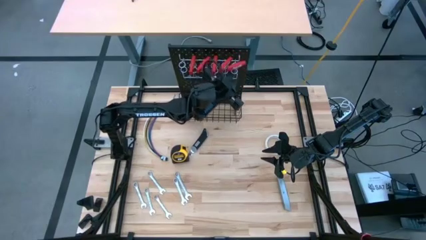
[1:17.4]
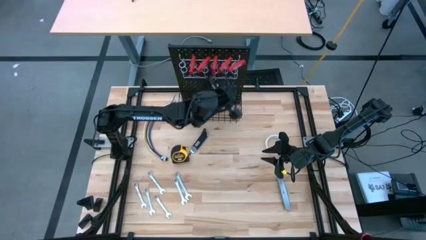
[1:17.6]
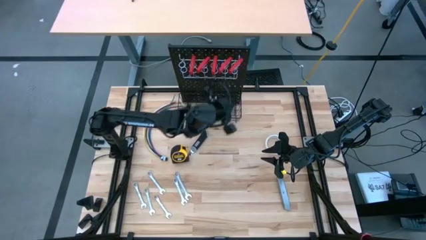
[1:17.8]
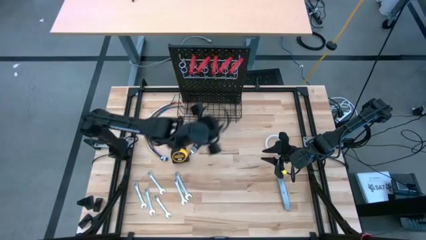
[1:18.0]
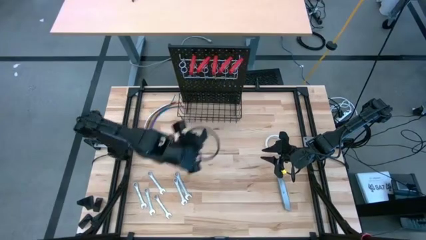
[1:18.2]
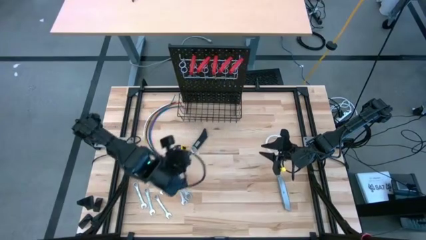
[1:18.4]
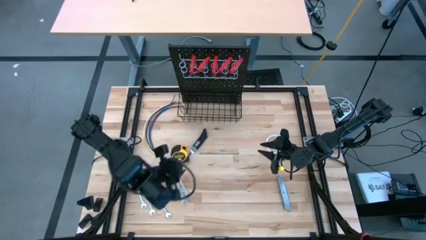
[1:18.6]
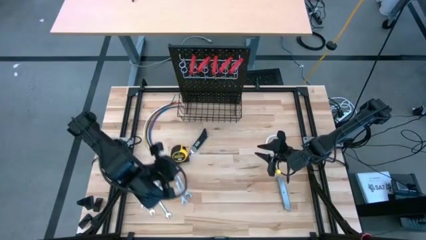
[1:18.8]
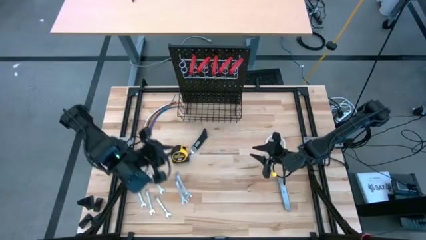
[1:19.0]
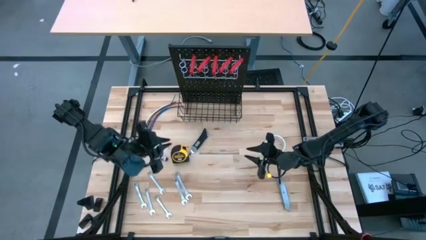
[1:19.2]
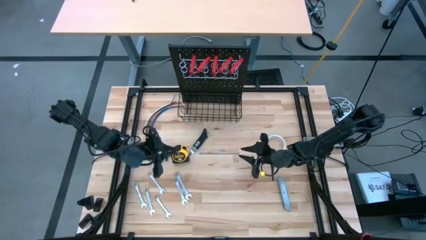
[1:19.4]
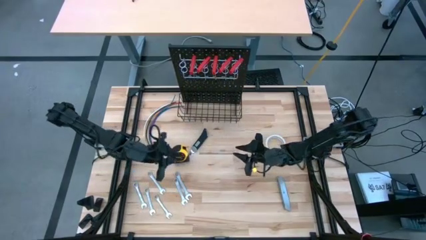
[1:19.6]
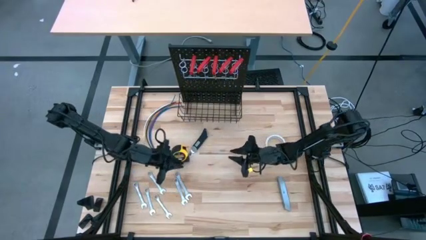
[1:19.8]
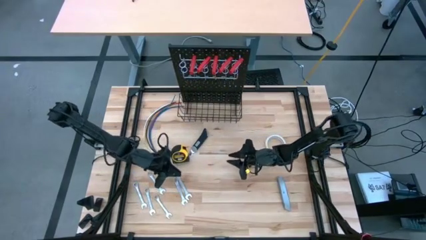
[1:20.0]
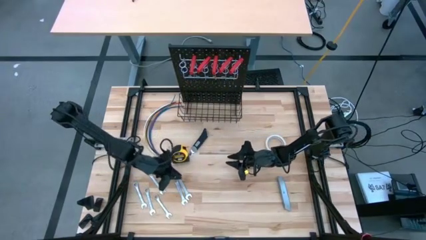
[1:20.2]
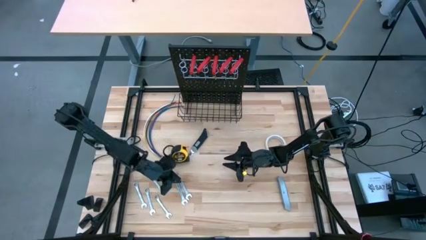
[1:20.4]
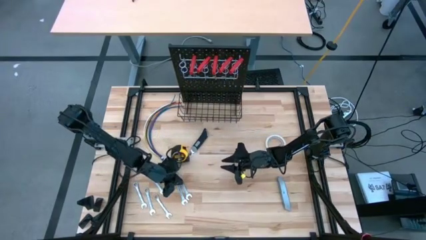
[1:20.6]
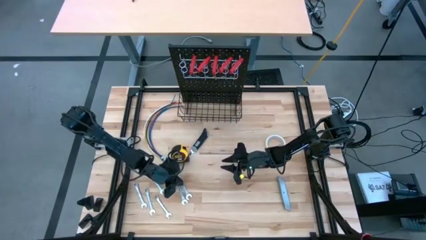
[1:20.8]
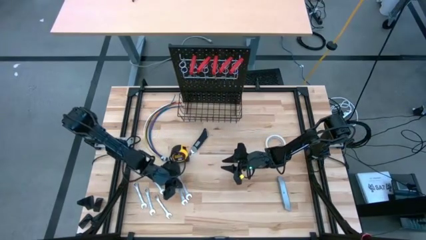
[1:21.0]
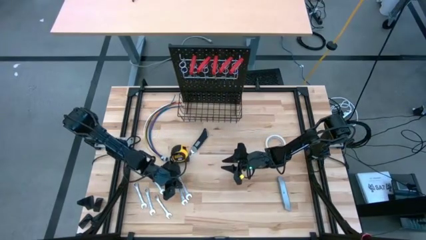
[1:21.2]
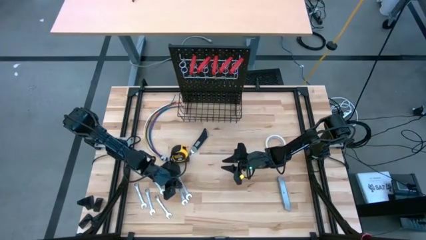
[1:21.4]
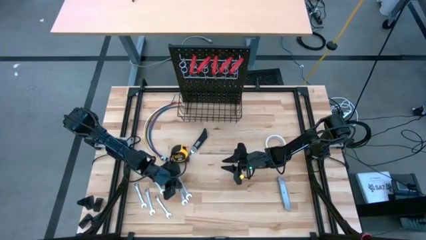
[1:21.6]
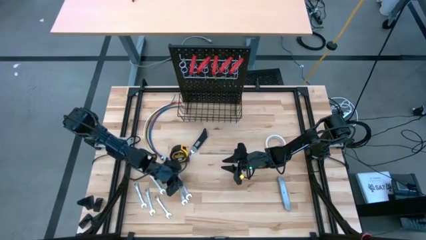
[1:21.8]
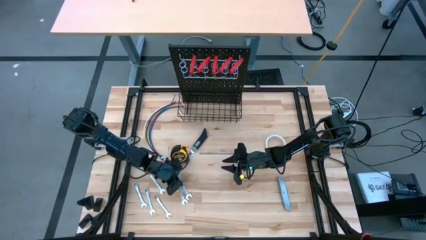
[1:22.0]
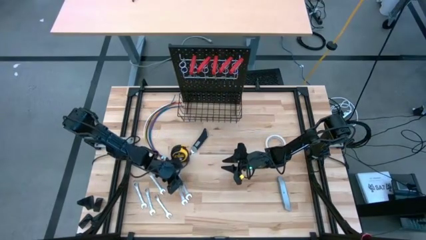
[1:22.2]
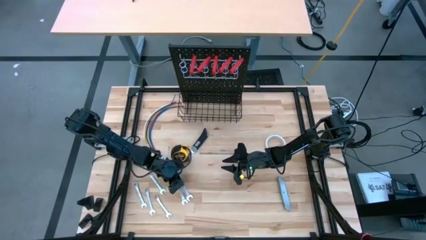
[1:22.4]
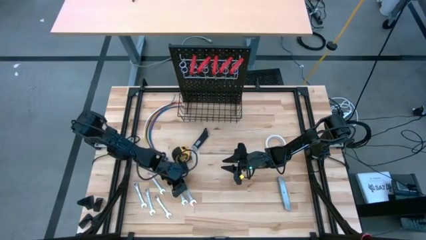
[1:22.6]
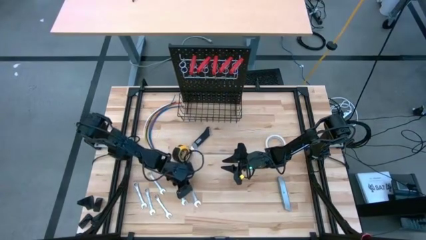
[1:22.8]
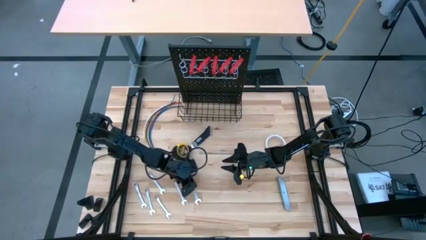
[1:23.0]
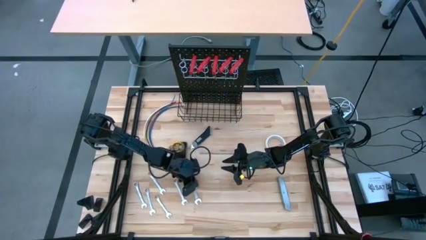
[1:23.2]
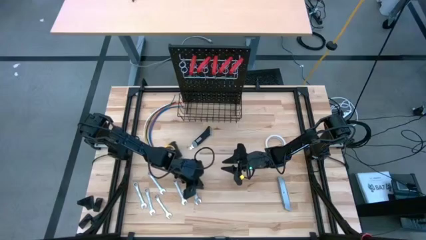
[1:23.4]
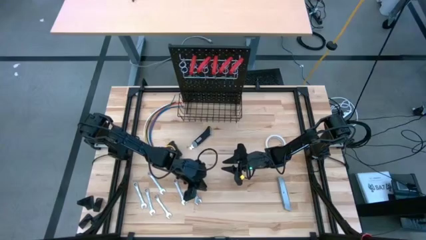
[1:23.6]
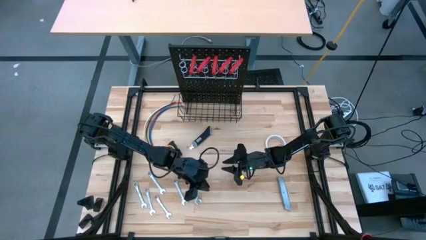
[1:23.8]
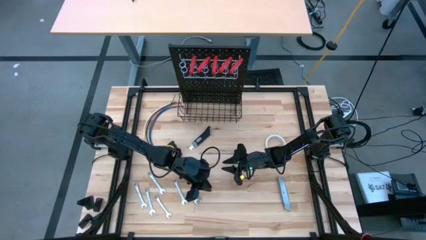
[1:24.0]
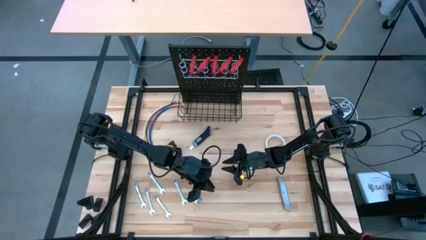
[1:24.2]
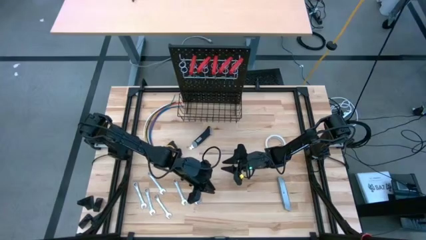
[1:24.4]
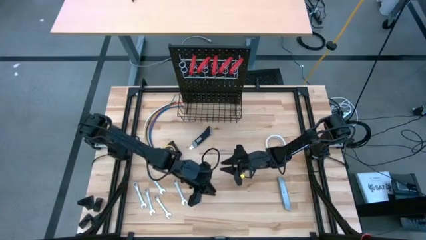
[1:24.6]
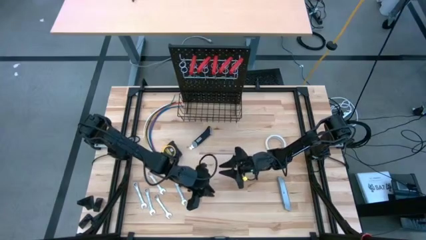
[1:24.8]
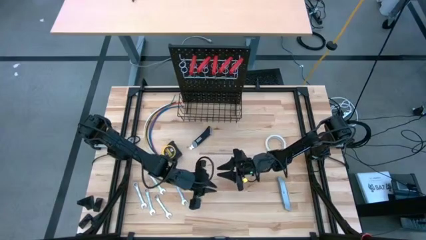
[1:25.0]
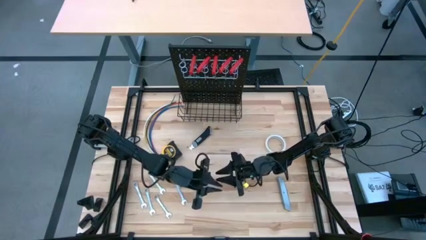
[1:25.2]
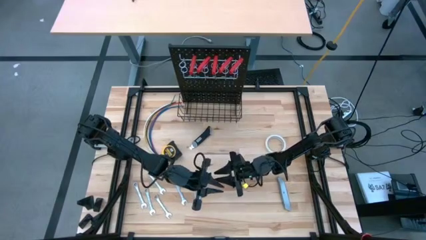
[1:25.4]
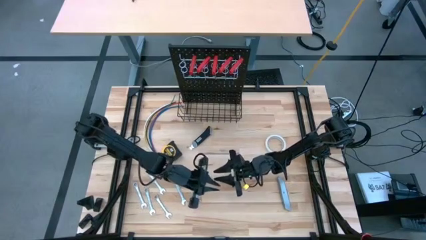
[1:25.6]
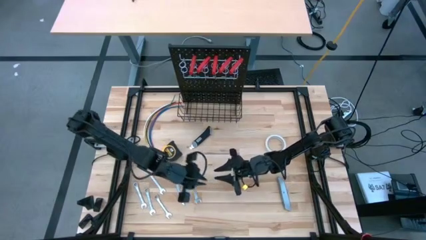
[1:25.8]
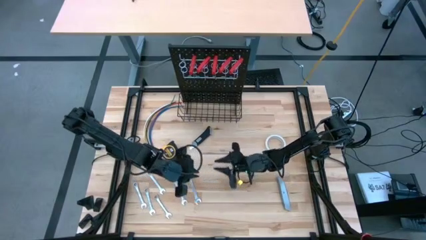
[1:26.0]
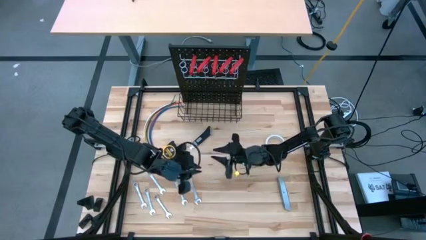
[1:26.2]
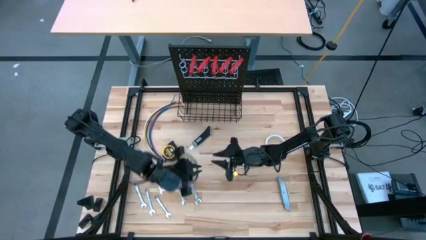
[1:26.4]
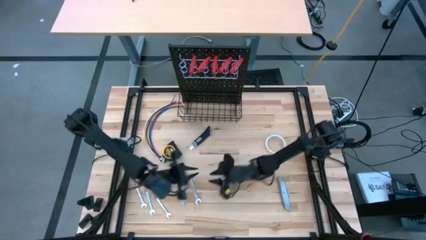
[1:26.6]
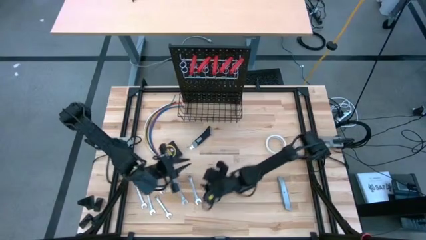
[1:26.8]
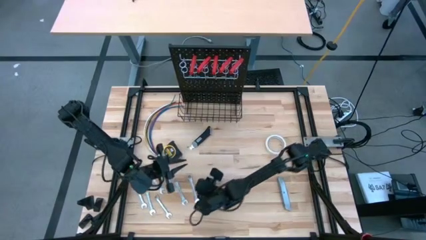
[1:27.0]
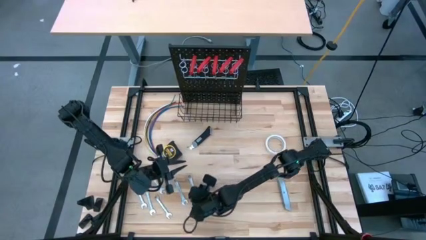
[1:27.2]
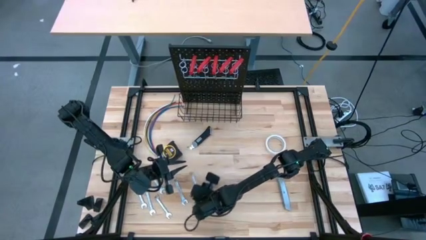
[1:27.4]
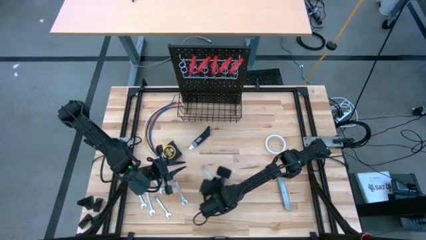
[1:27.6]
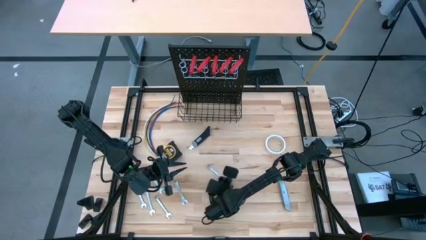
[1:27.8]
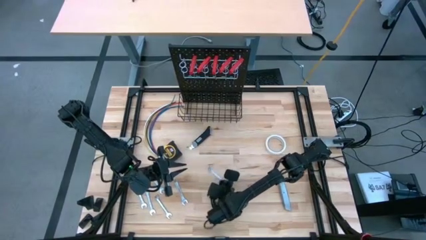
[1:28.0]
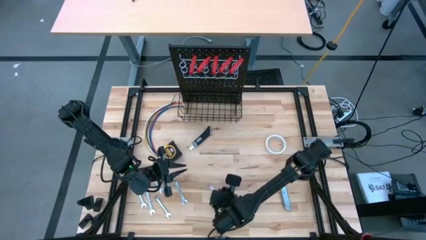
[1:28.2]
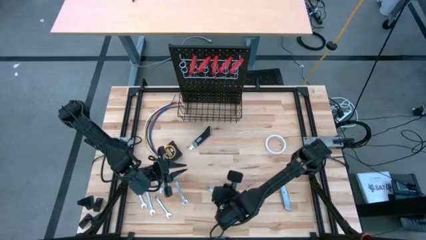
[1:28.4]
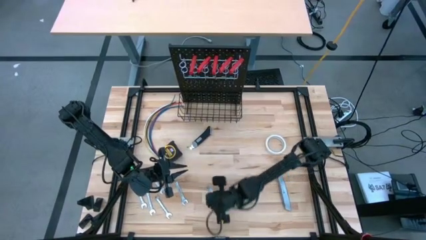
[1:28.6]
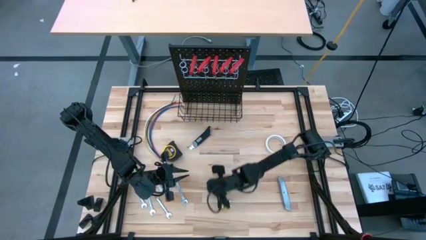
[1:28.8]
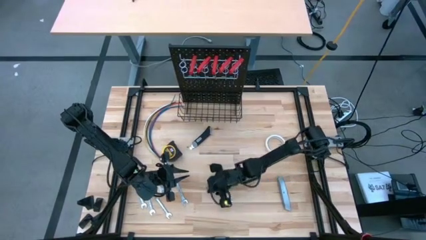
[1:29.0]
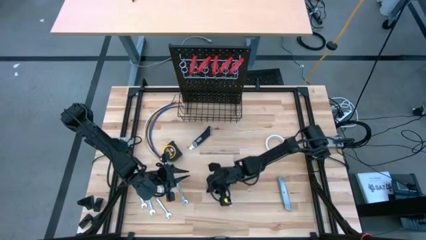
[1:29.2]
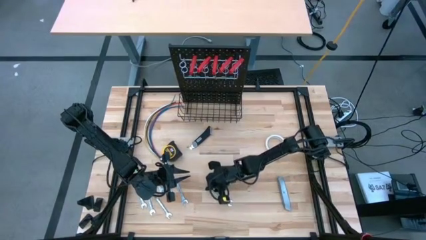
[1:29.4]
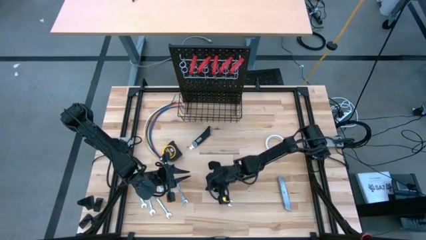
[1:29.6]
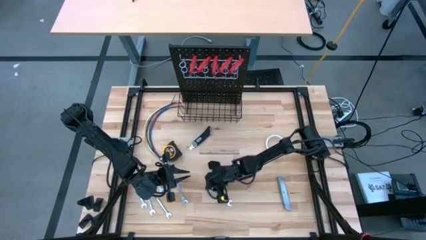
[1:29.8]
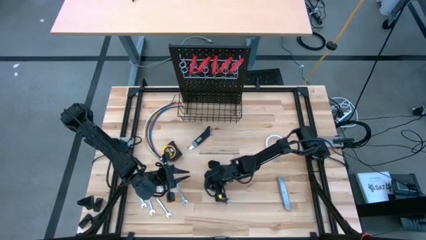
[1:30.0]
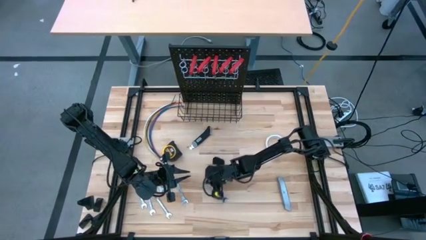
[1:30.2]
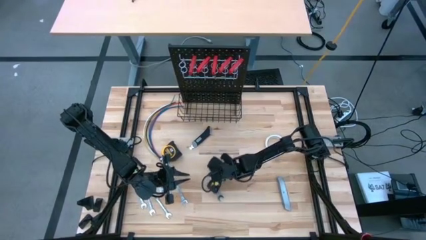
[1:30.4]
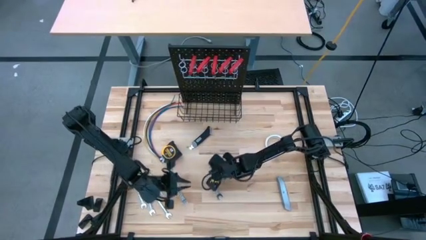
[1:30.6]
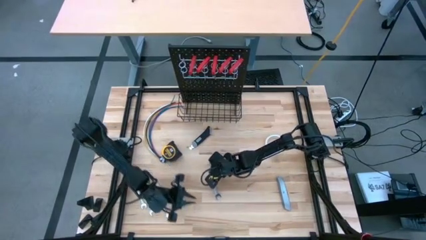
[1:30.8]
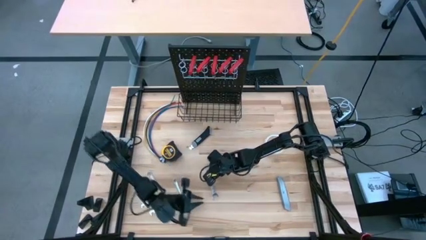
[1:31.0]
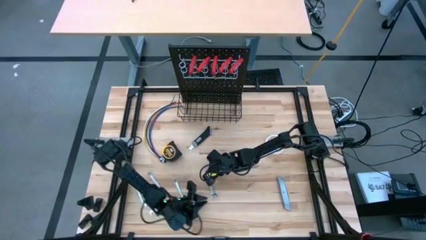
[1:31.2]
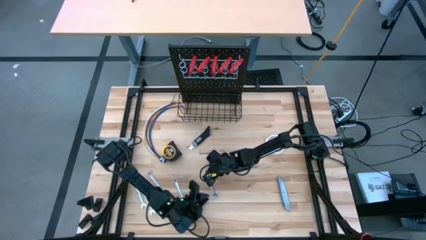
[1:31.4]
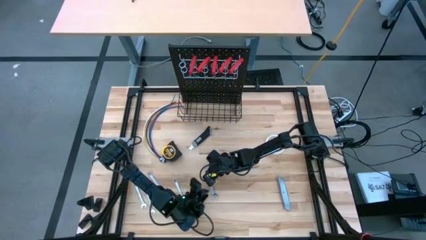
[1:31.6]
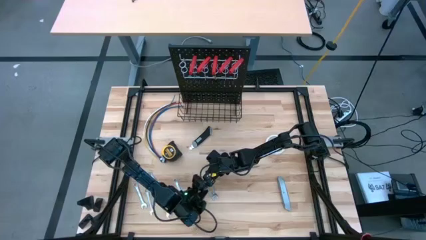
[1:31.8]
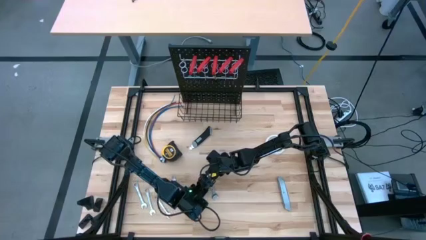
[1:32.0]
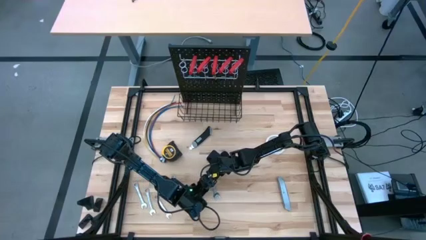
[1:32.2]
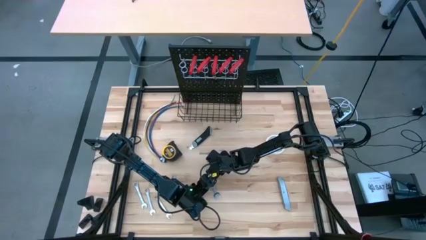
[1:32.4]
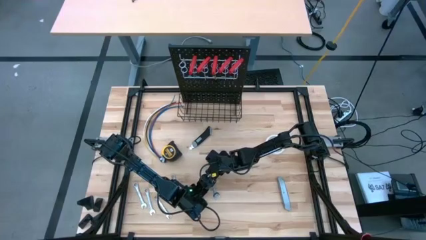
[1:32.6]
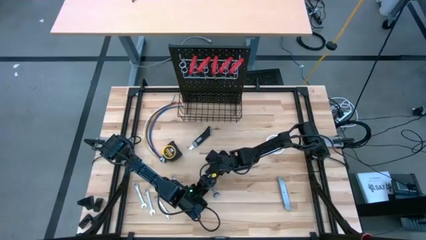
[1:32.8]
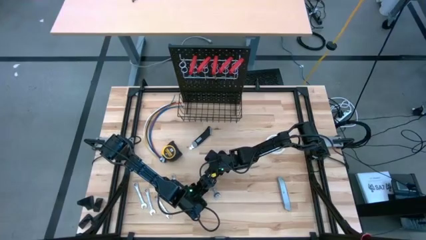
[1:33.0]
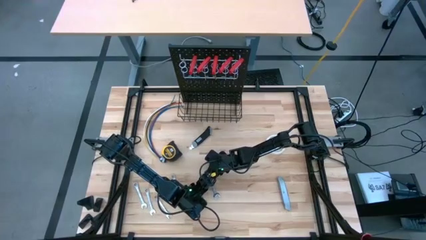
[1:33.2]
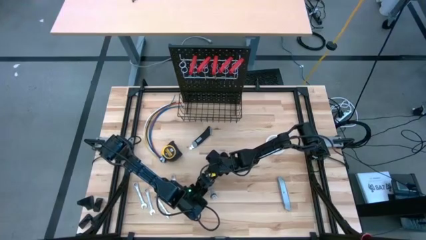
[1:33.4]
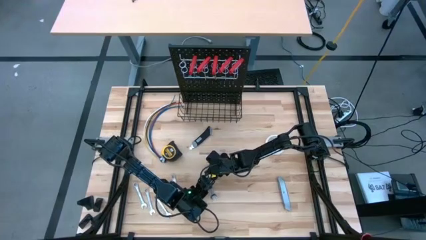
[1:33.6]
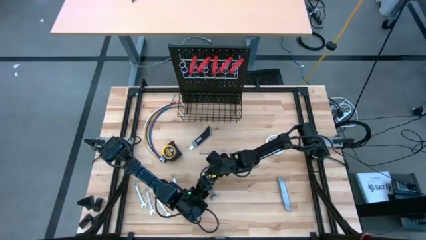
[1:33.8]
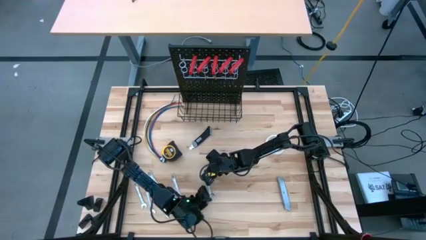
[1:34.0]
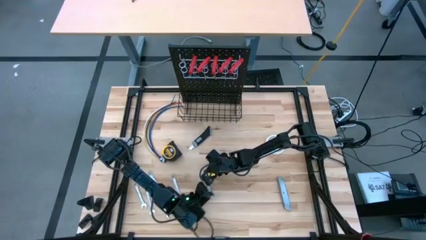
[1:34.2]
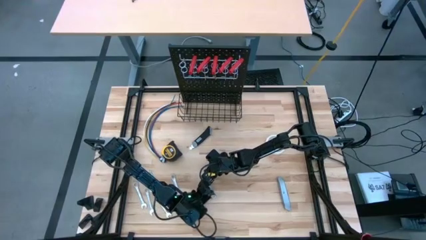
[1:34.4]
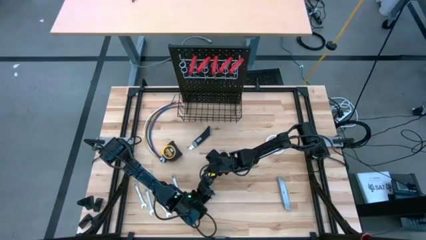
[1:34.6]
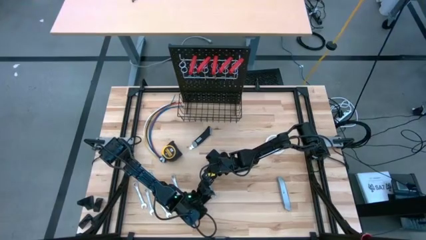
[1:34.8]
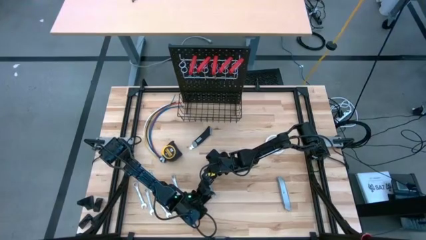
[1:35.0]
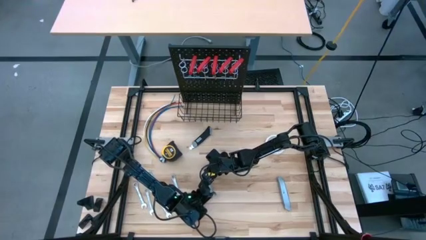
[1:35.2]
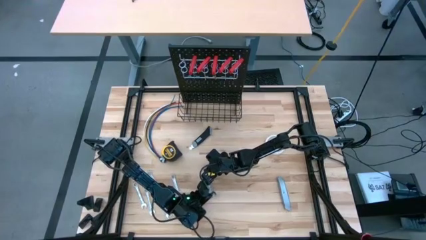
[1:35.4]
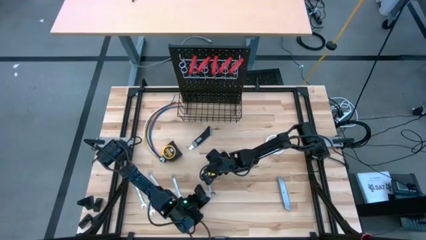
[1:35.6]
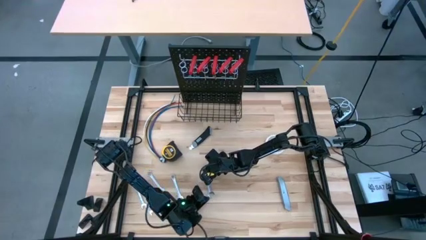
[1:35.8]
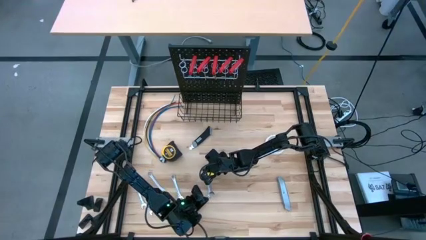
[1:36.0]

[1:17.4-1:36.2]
Task: Hang tools onto peg board
Hang the wrench on the peg board
